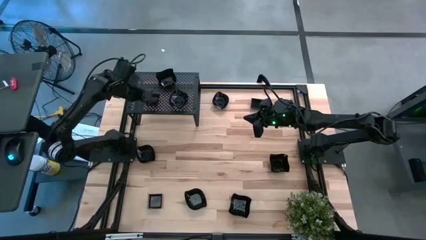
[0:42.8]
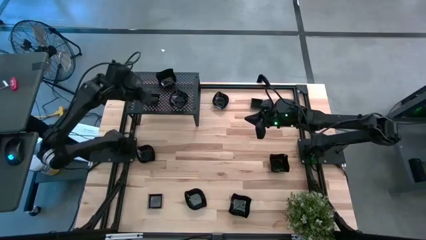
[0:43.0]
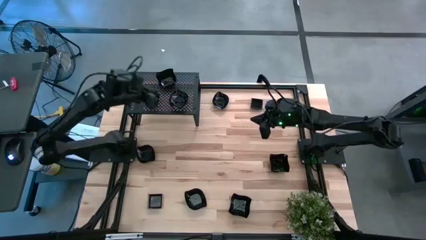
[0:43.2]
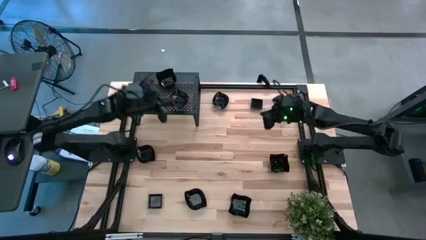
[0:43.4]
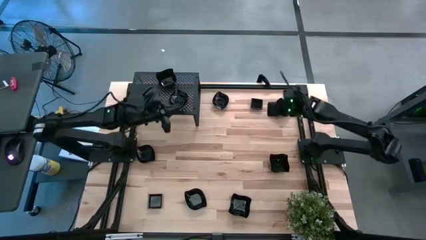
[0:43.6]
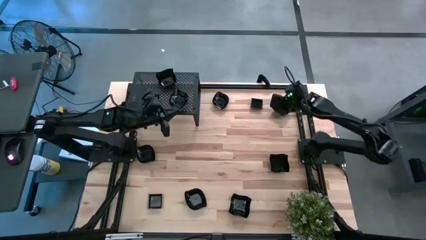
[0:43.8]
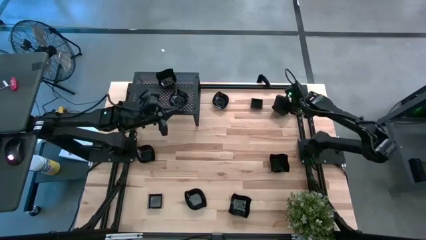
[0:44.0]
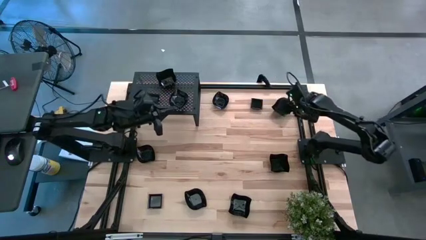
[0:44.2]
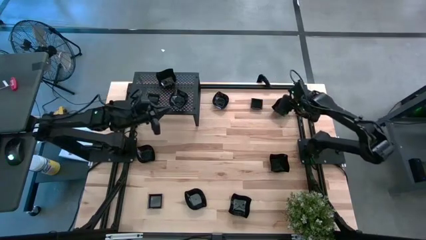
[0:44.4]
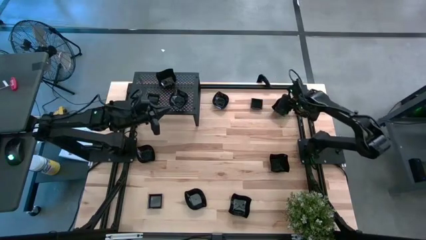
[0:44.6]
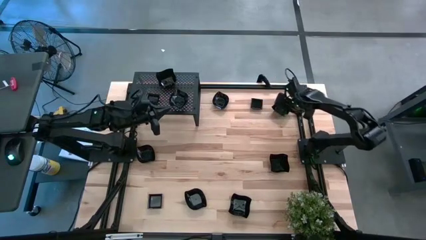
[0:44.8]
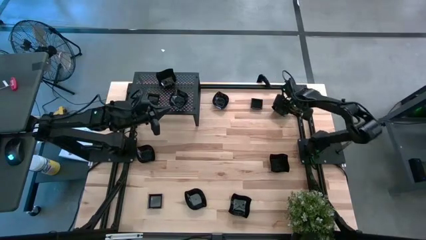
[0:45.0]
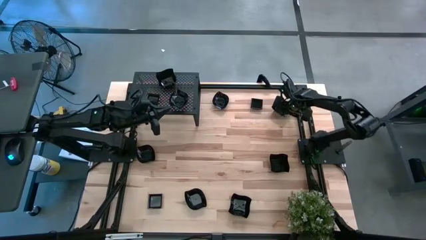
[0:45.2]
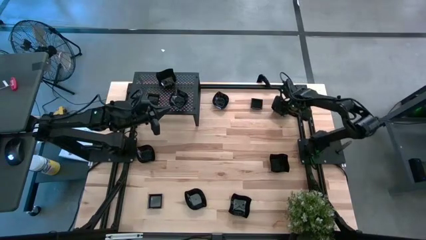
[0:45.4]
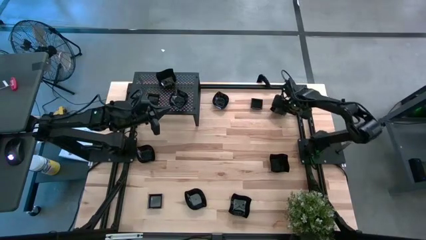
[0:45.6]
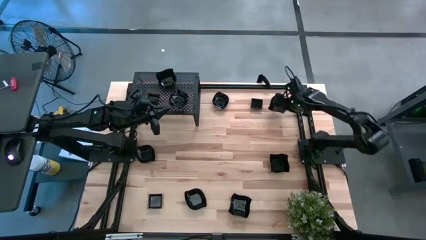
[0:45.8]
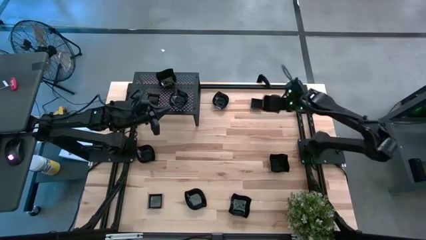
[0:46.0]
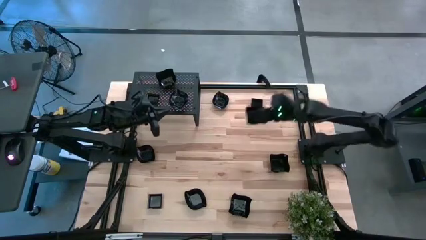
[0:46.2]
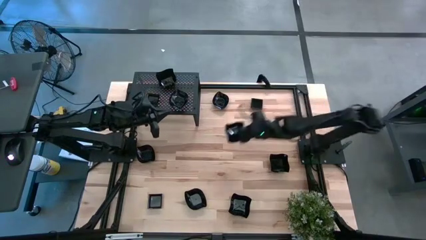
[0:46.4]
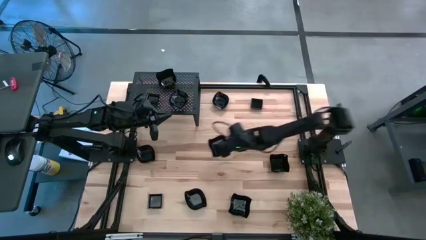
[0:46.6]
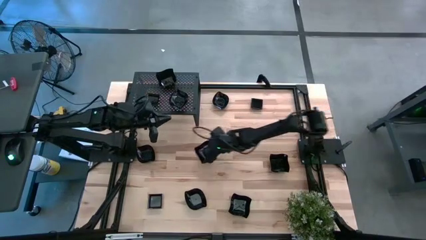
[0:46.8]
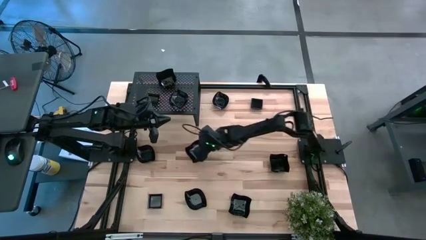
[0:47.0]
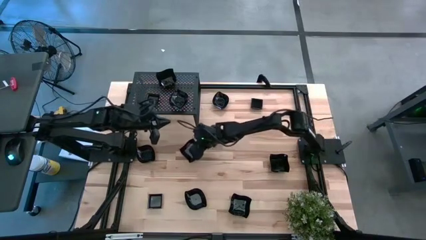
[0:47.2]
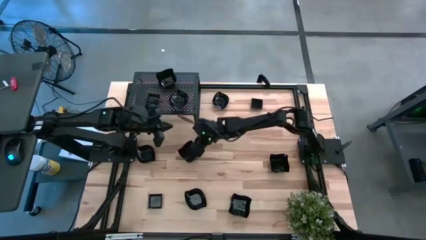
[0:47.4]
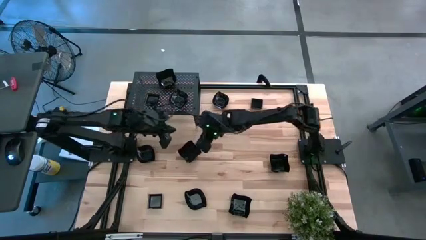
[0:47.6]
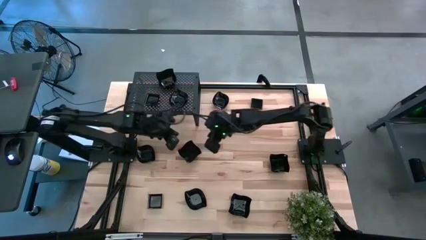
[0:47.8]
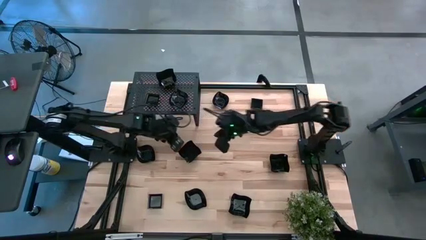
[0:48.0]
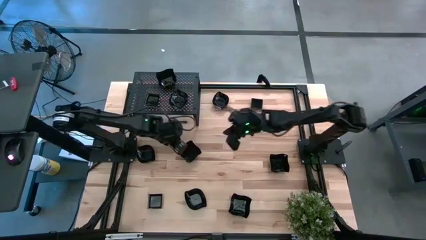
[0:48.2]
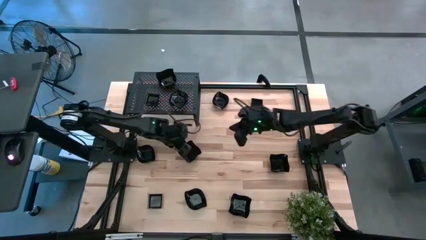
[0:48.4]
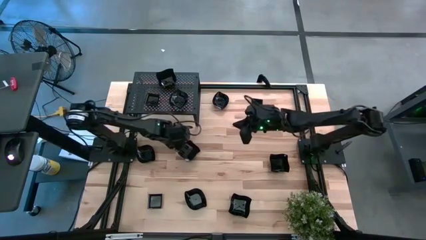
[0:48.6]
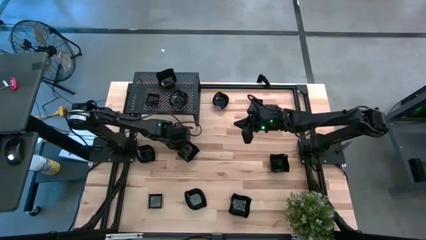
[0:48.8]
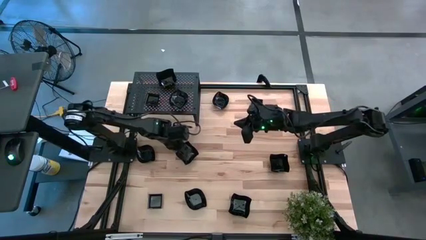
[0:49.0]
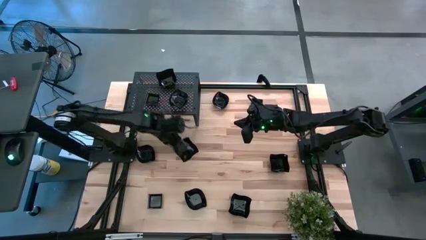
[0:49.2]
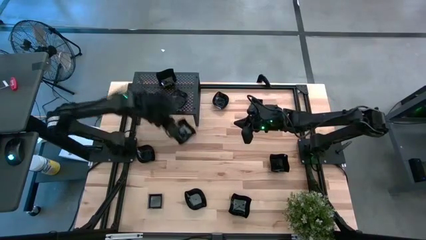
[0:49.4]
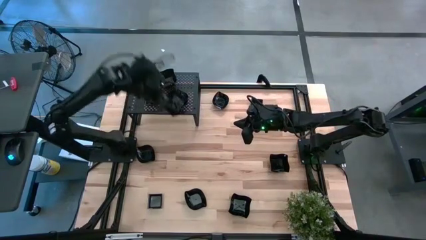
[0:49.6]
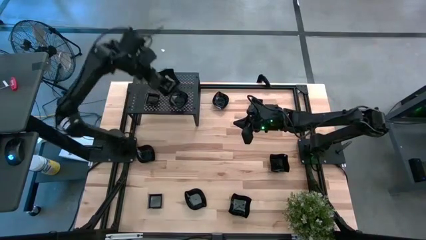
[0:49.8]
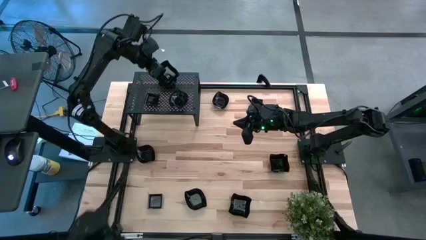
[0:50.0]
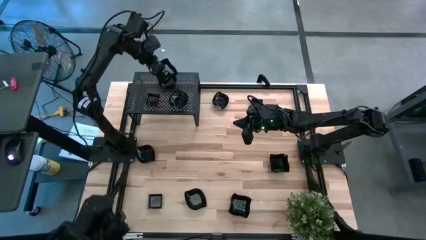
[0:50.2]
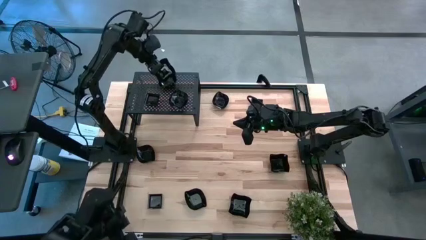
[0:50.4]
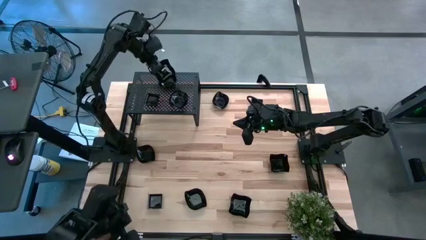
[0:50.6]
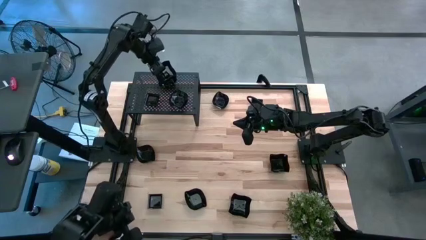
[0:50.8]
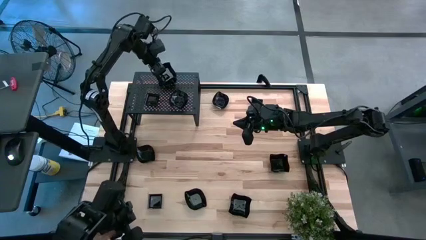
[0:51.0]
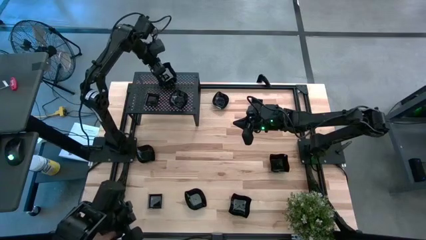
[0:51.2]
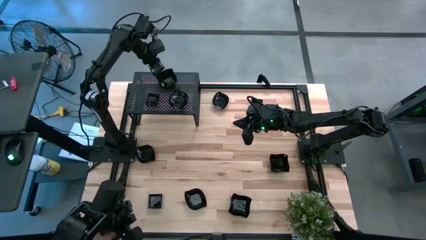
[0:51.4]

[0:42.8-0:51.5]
Task: Pick & Place Mini shaped plates
Stack the black distorted square plate on the other black distorted square plate on the shelf

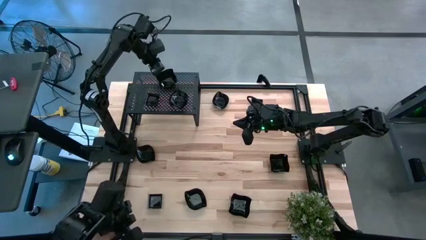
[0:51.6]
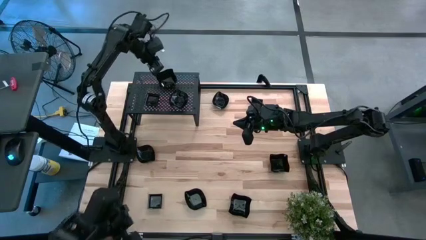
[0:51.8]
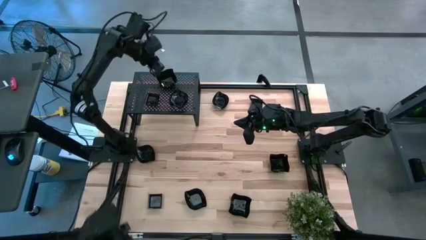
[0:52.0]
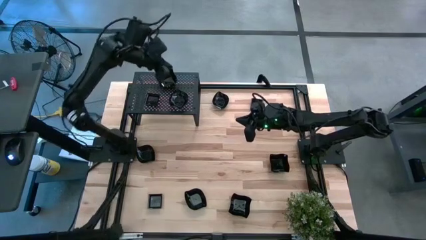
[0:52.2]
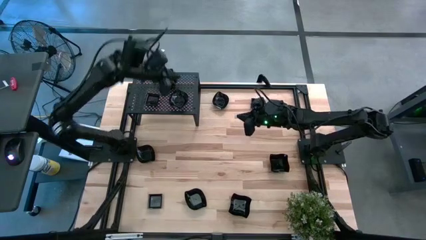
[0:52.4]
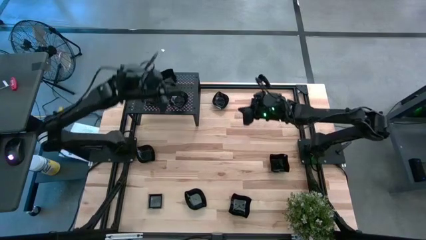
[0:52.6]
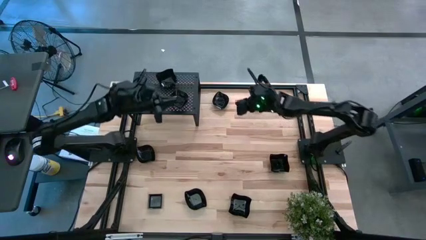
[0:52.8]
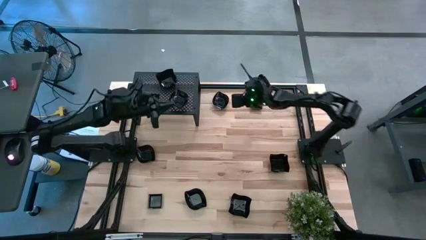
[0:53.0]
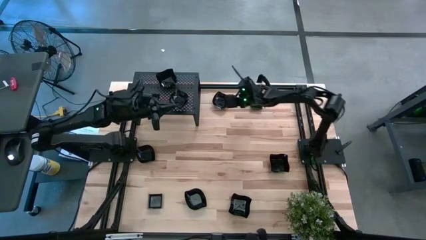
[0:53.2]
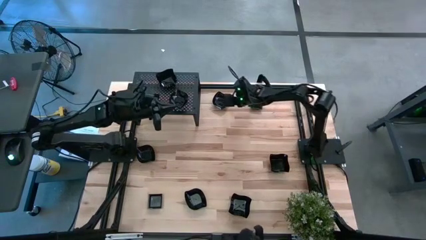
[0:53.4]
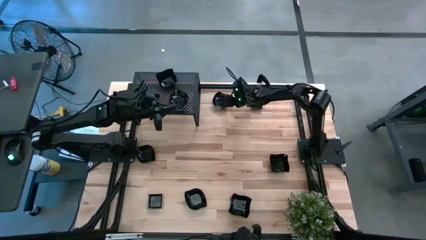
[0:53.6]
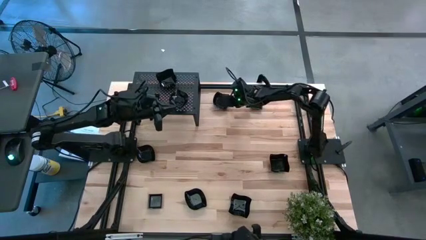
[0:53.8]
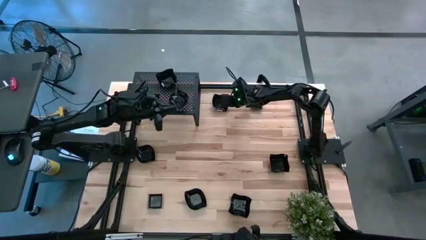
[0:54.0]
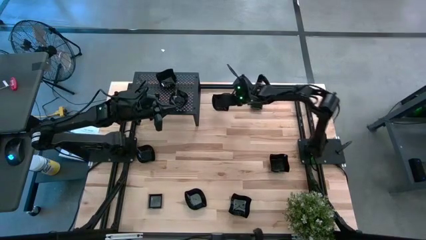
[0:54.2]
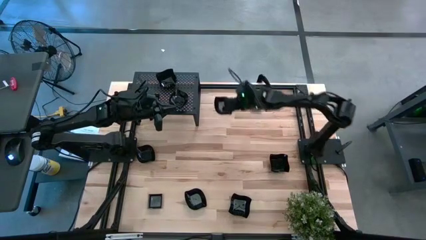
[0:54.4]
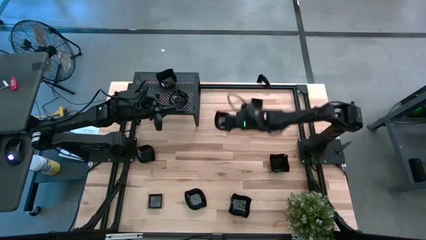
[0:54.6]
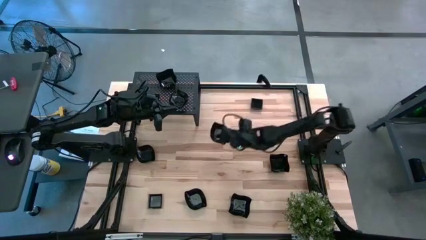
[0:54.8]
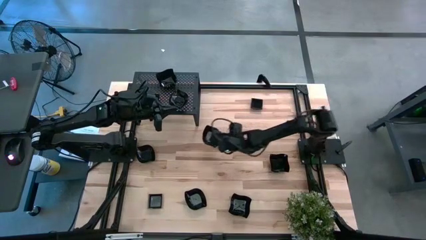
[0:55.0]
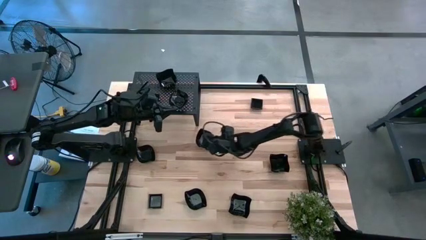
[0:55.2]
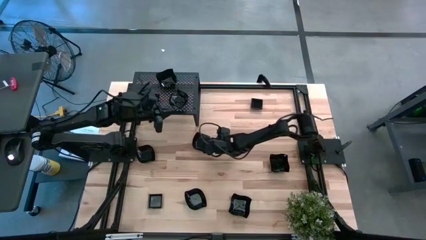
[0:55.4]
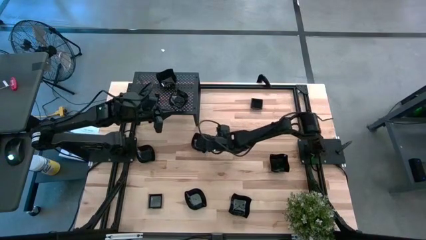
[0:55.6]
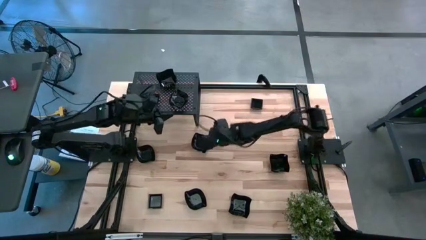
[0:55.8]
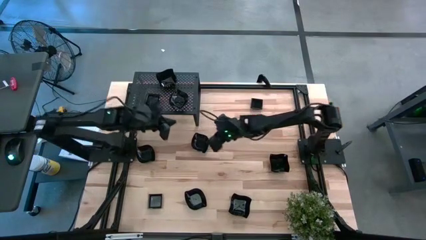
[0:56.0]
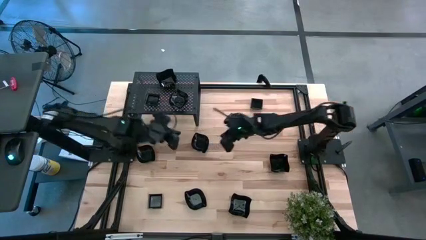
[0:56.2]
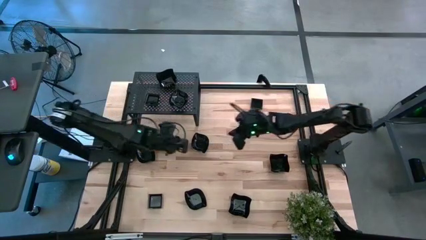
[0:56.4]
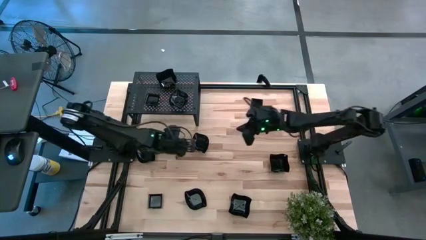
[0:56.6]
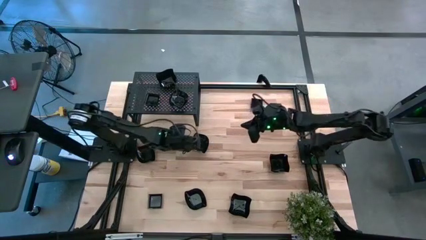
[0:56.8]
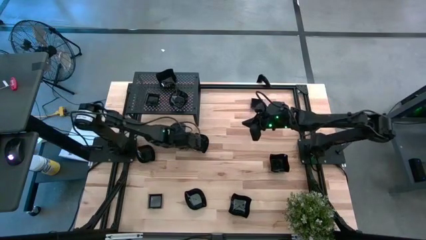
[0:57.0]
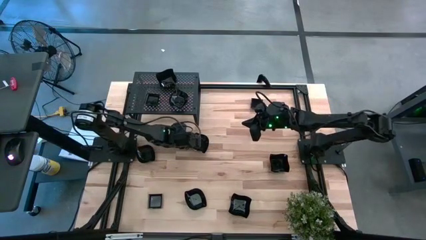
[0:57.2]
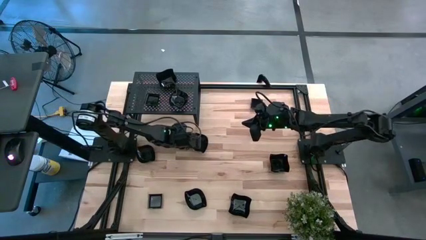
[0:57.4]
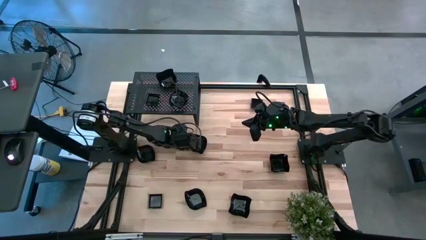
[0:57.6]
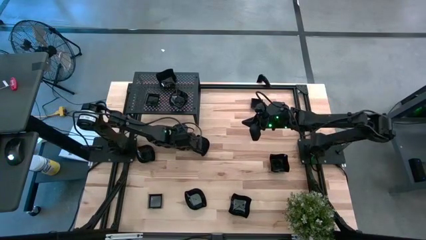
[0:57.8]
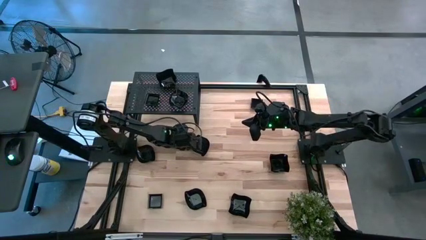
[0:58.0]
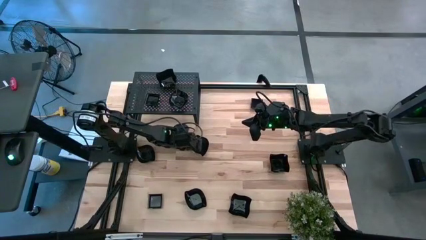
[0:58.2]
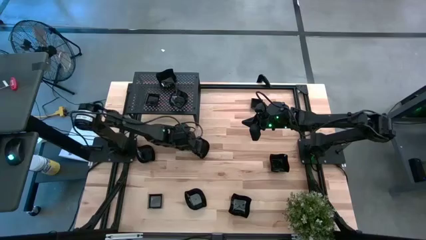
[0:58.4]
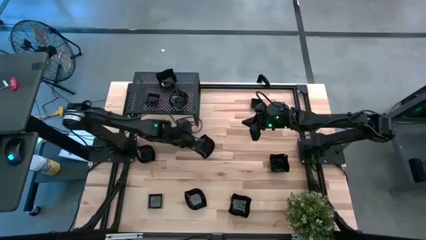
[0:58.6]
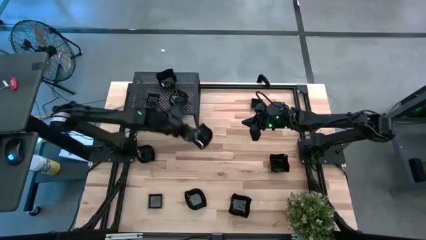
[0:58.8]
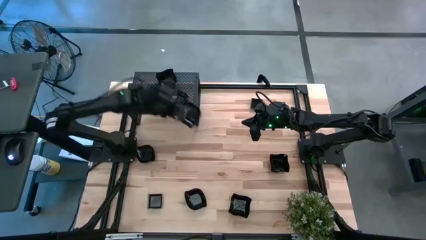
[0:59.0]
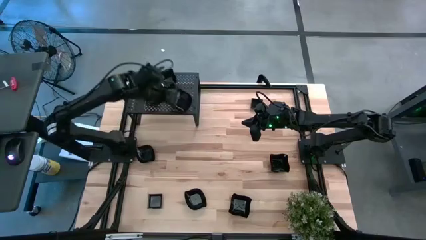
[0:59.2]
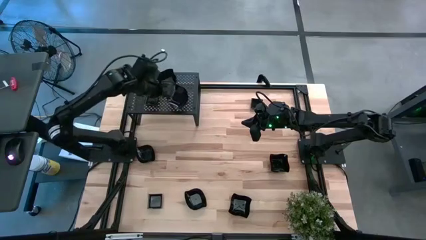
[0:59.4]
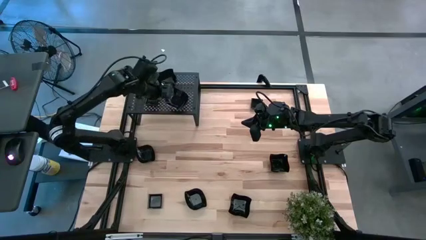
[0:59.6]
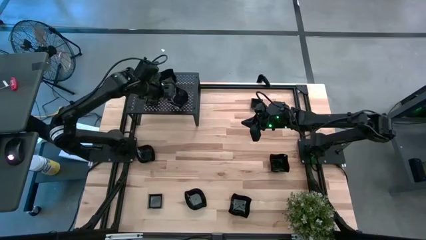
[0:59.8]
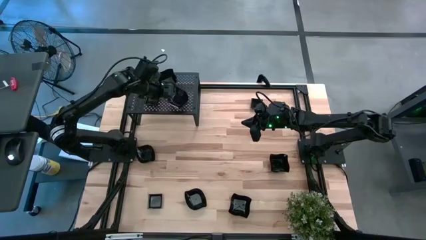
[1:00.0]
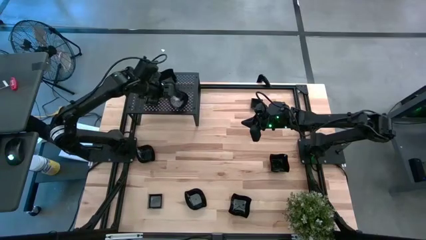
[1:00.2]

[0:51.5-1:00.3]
Stack the black leaf shaped plate on the other black leaf shaped plate on the shelf
